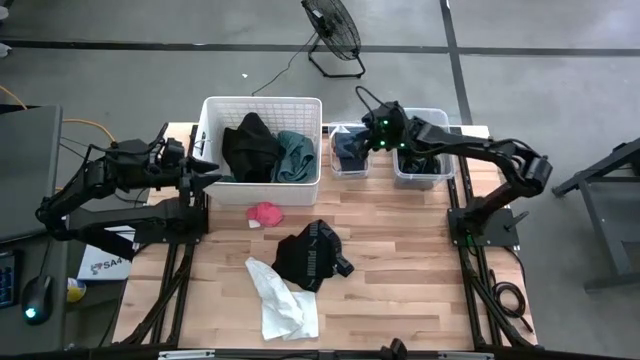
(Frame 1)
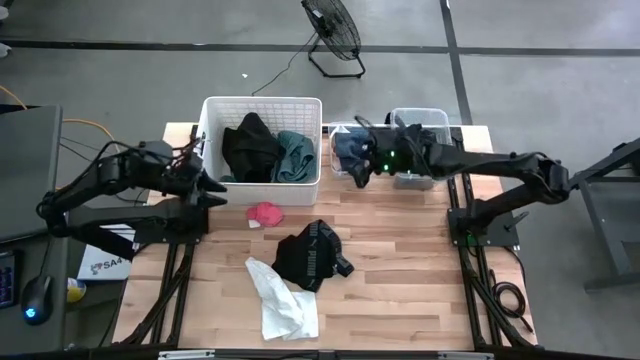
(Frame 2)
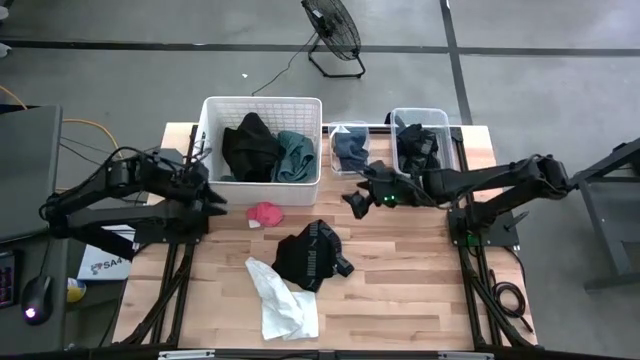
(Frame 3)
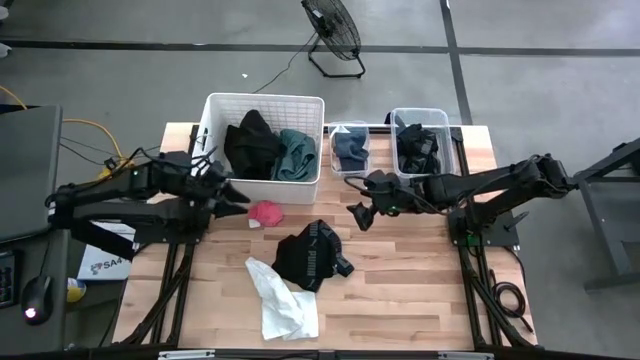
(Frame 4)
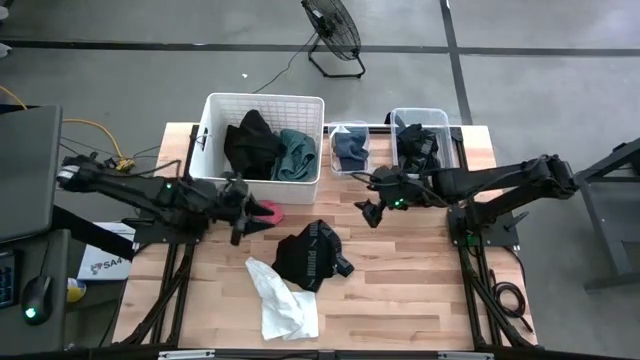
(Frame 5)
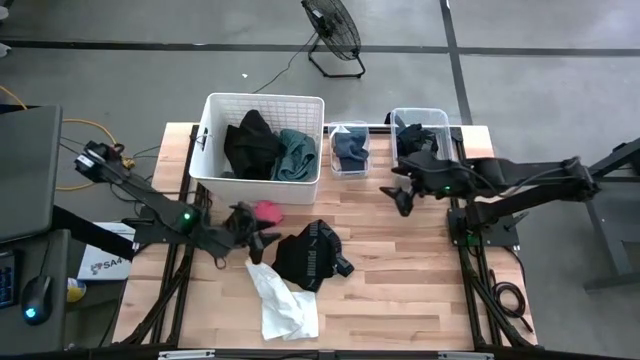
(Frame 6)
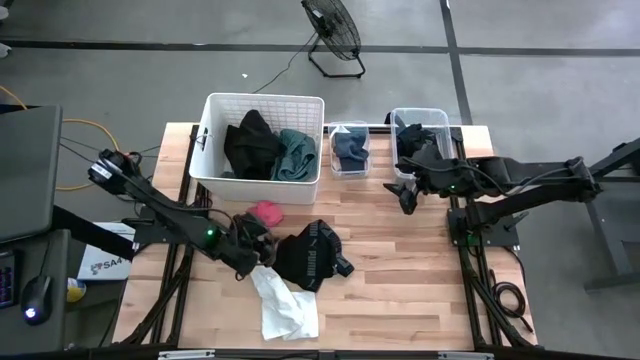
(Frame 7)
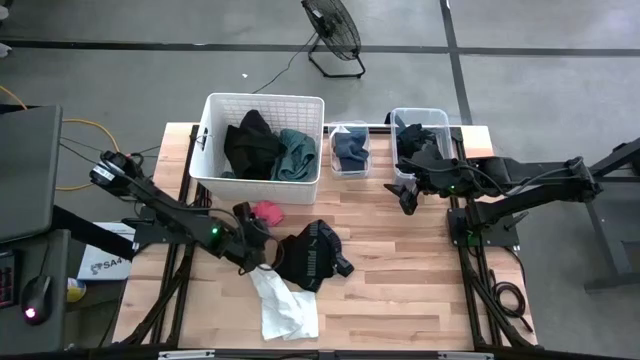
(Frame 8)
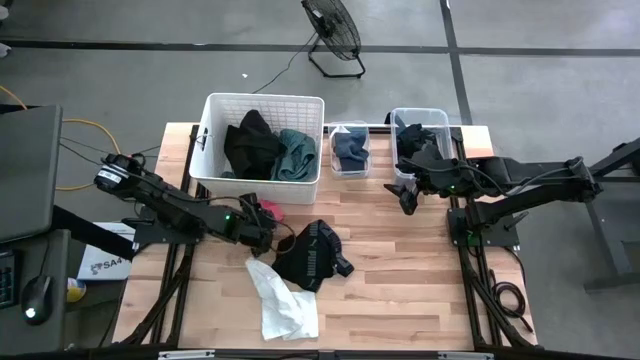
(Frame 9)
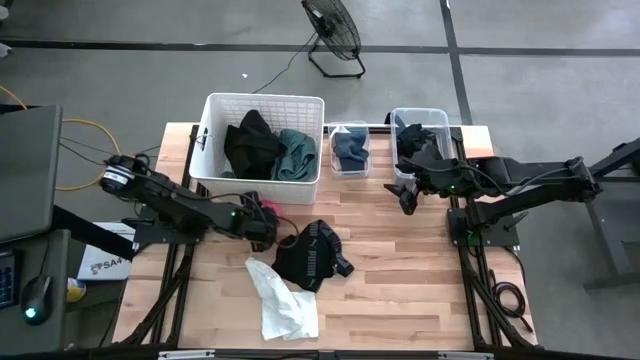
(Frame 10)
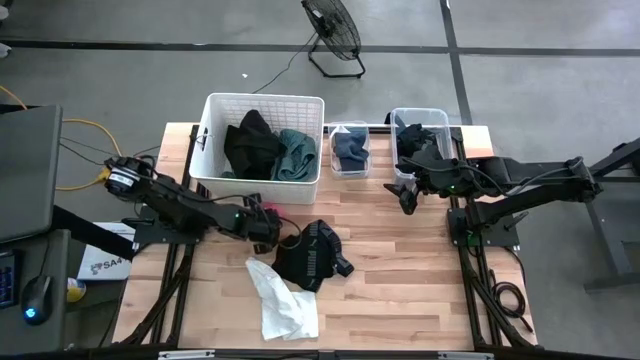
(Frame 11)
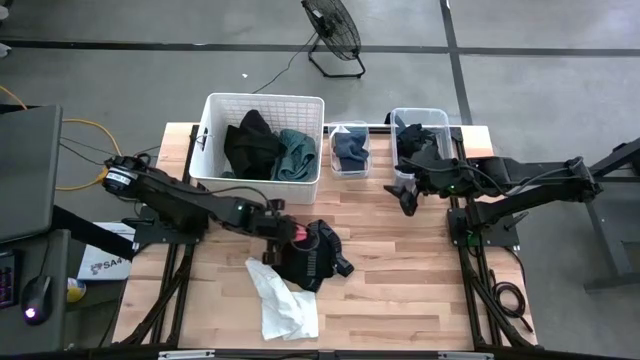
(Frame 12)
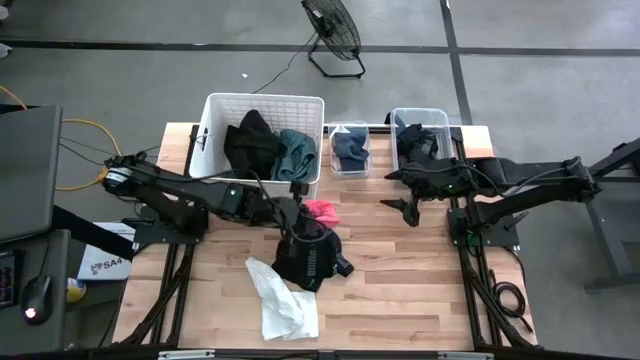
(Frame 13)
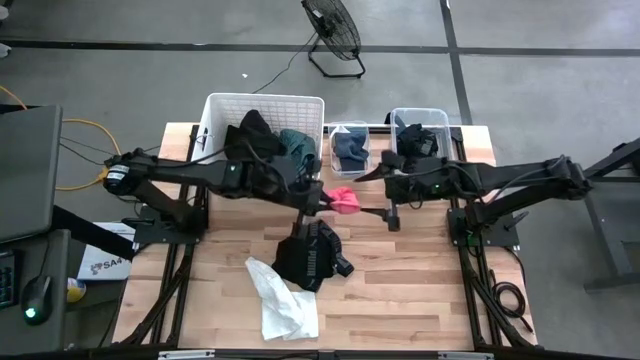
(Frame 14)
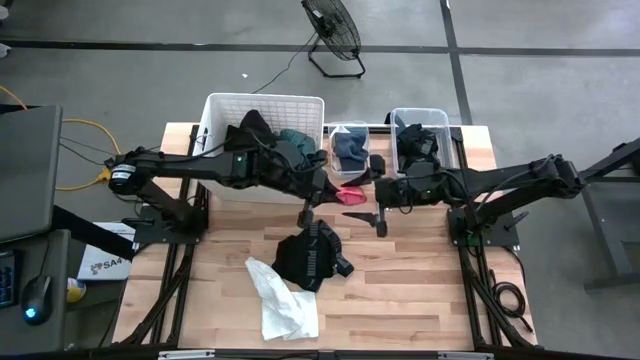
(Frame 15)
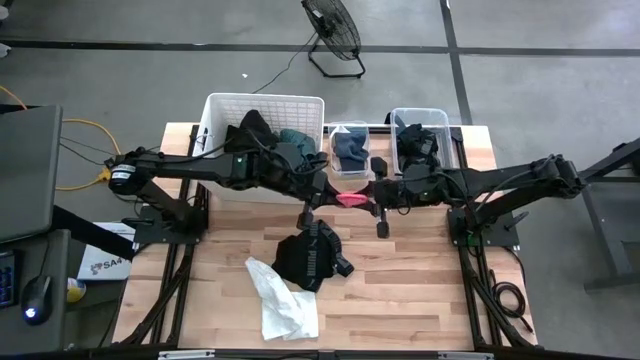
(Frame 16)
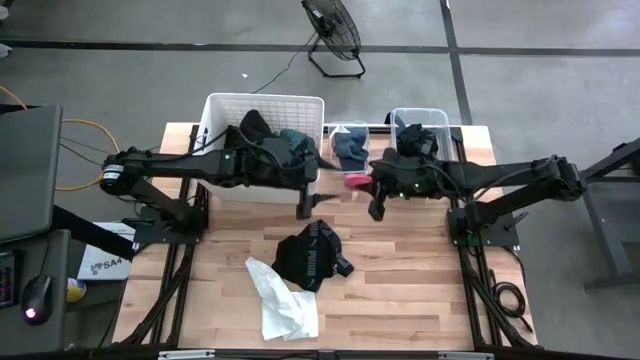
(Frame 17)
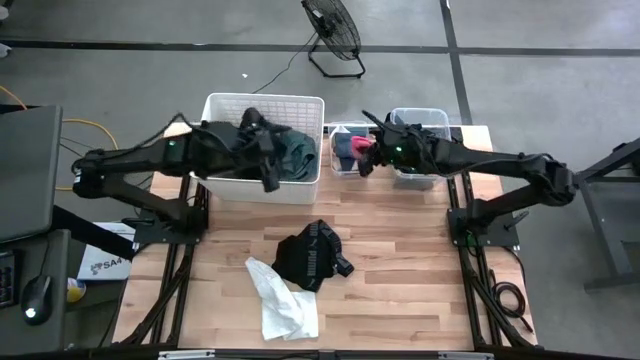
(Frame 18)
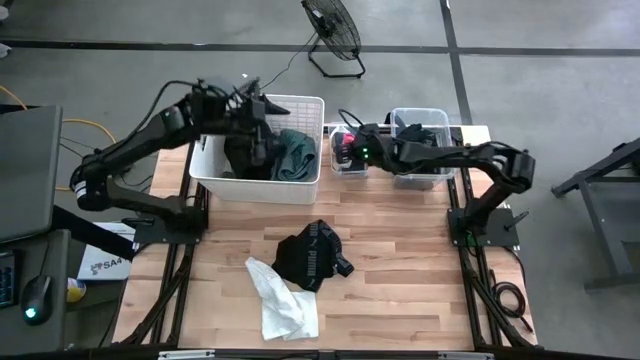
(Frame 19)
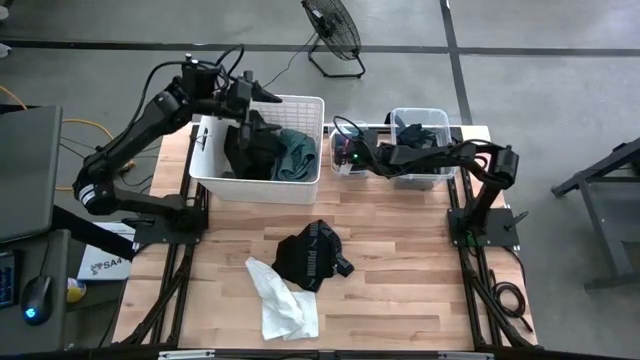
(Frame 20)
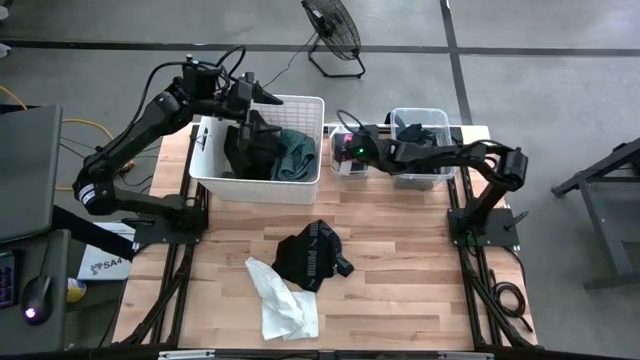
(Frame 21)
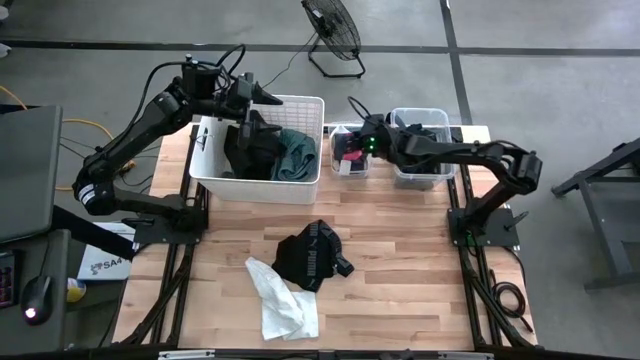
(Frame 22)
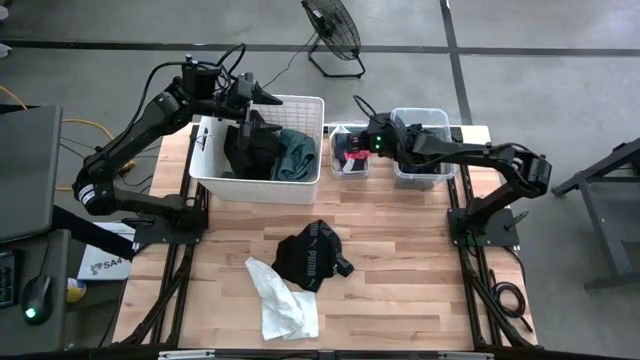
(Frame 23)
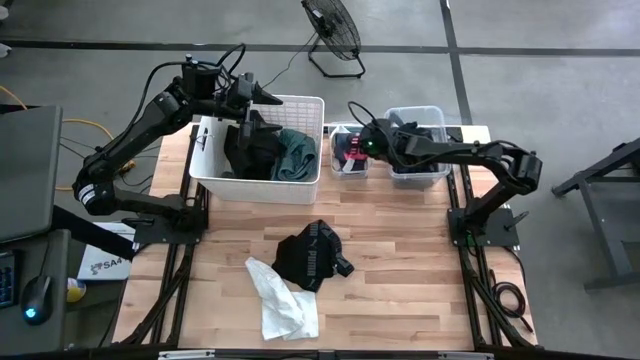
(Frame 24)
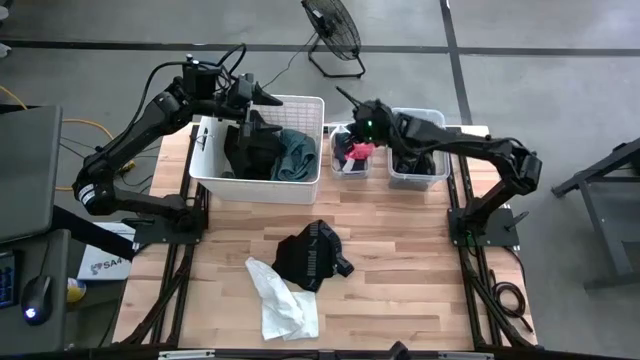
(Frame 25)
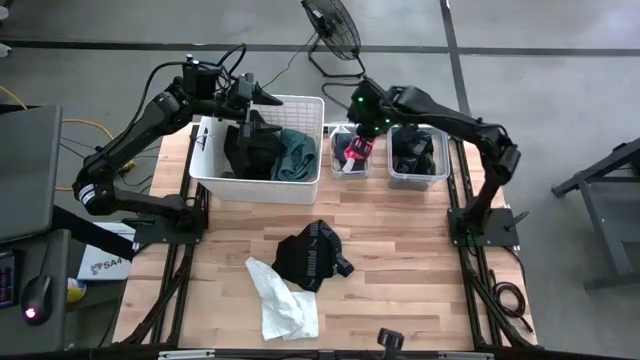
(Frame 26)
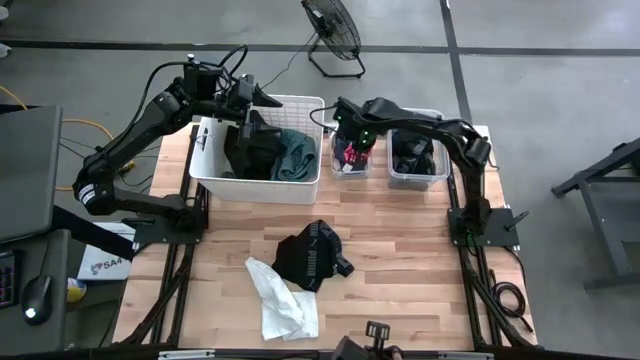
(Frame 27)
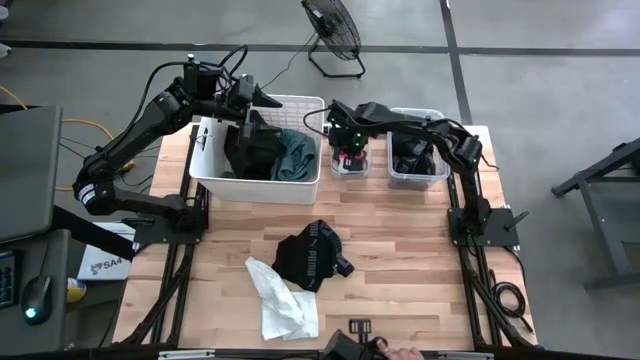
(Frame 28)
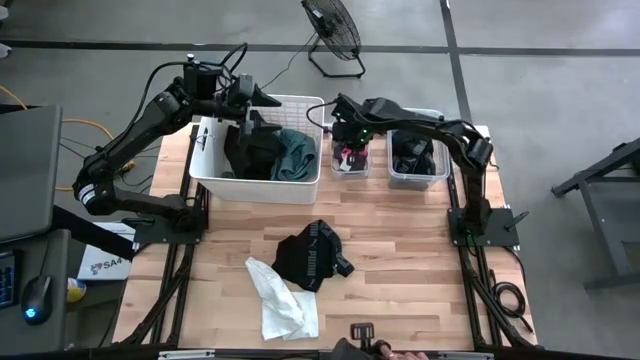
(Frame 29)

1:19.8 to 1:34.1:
Task: Pick & Place Cloths
Put the pink sock into the left transparent bin

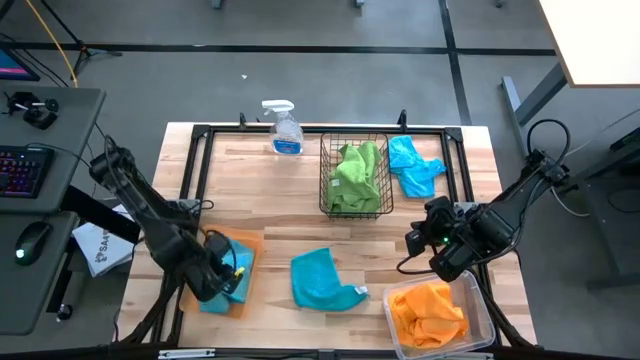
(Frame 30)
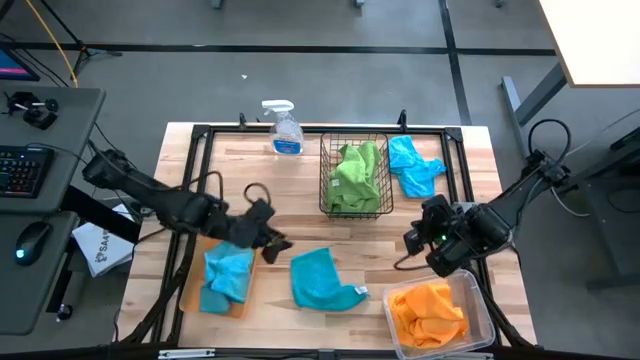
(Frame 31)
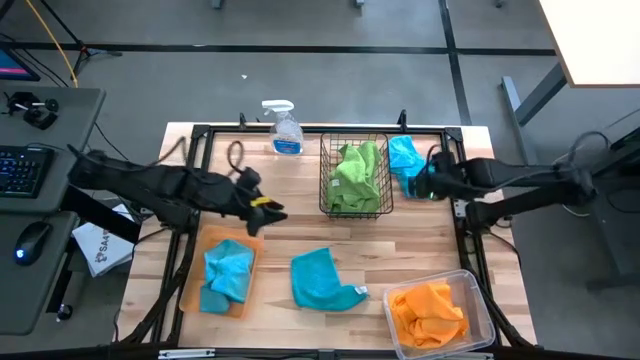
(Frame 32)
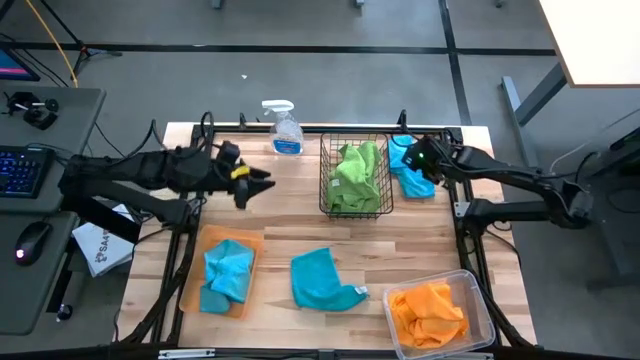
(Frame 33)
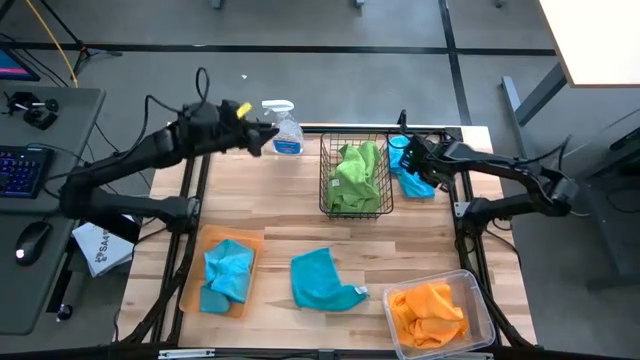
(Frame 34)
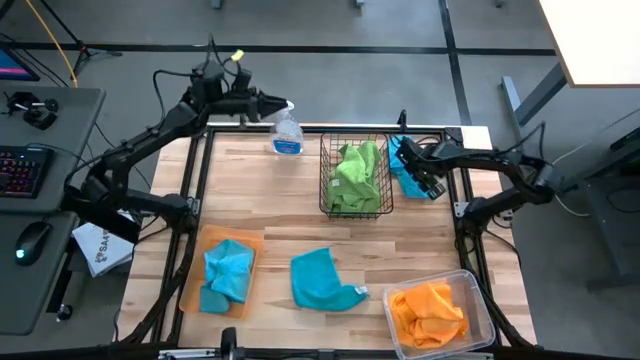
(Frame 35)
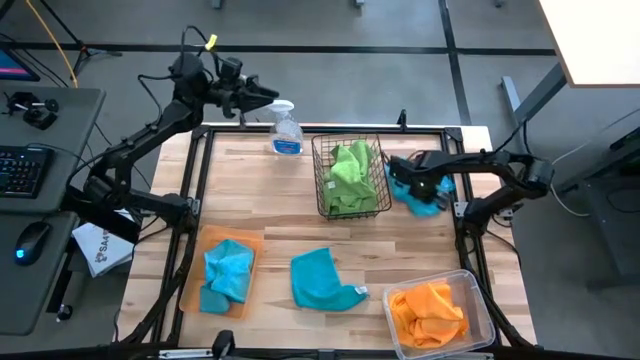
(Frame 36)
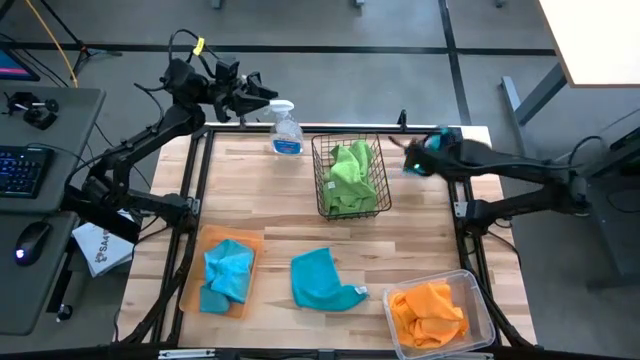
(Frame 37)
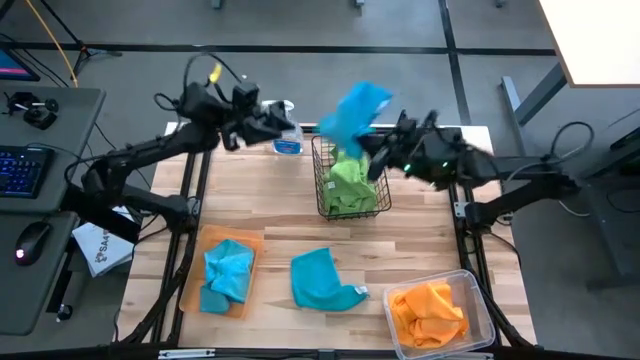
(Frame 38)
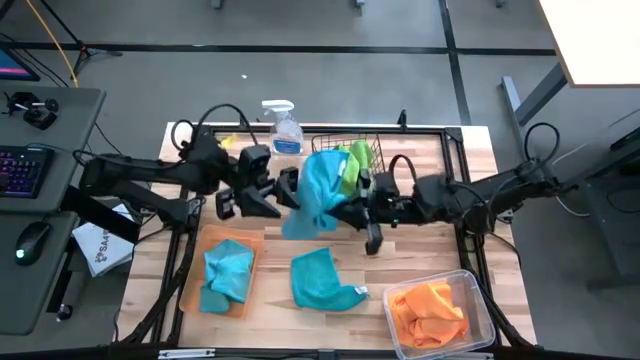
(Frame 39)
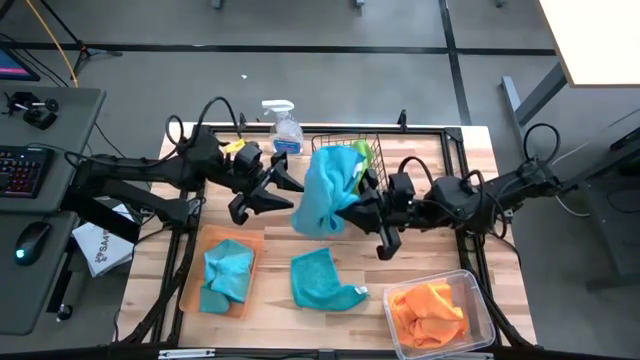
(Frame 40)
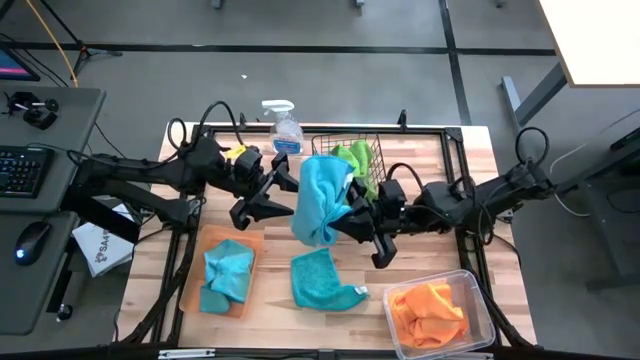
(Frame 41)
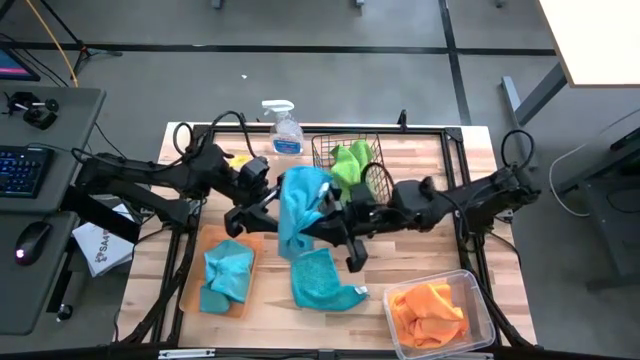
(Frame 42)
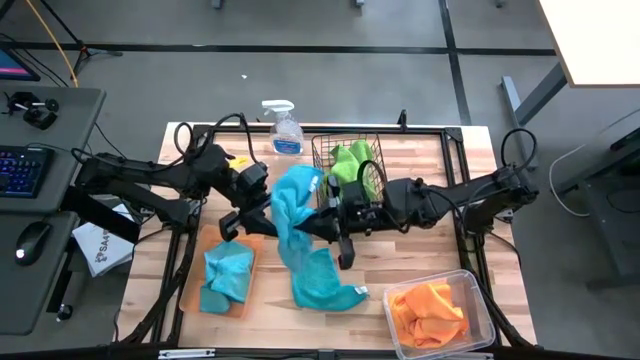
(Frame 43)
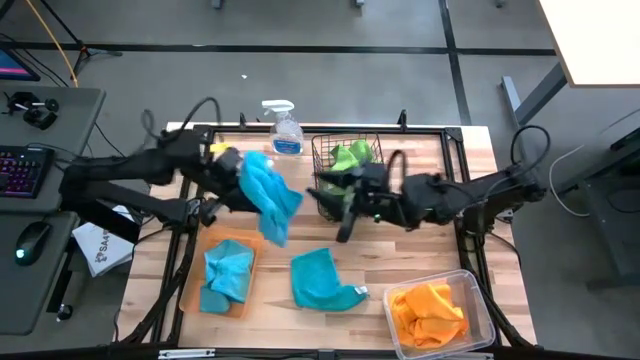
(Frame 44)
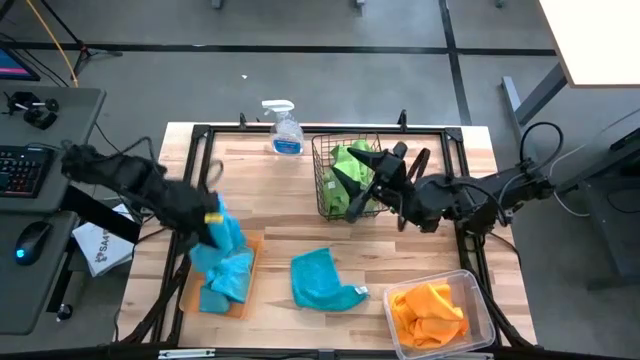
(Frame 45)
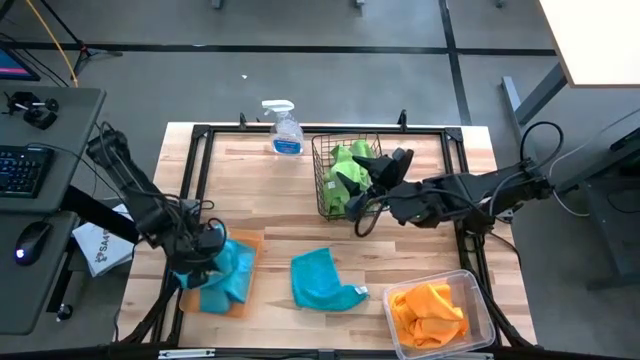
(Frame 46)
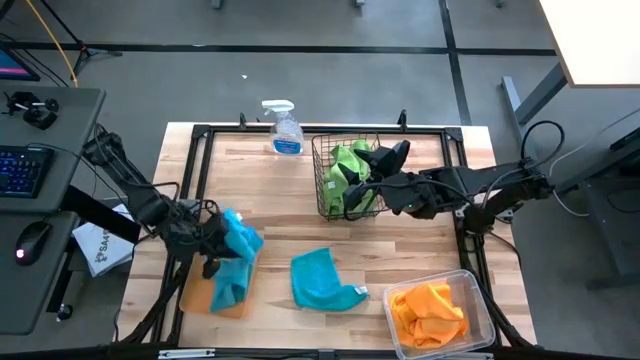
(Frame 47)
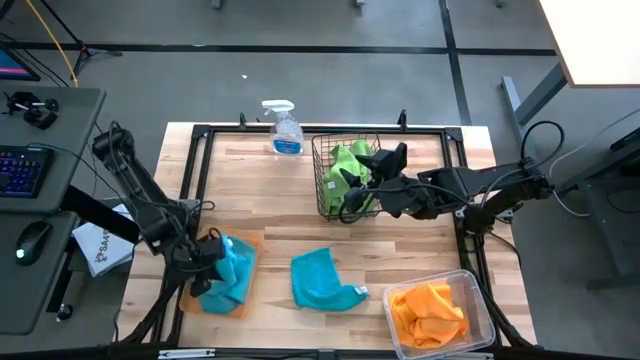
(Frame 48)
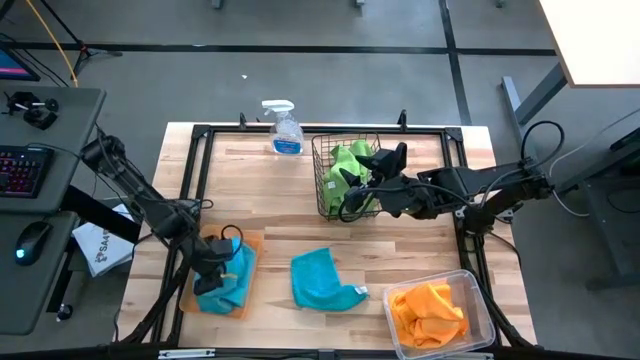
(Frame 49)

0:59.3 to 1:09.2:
Task: Sort microfiber towel by color & place in baskets
Put the top blue microfiber cloth into the orange bin
